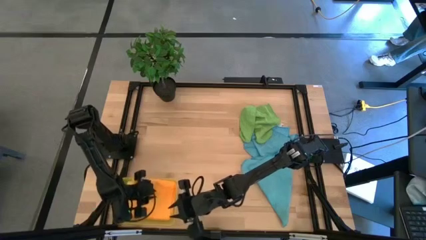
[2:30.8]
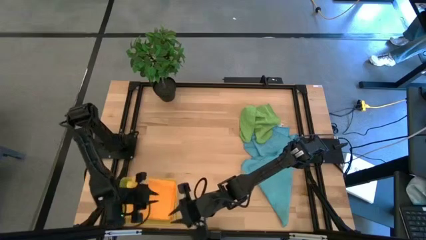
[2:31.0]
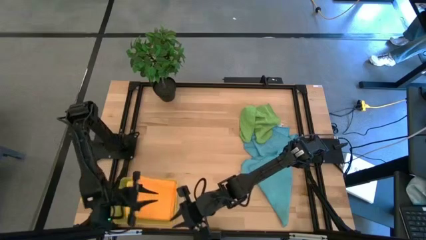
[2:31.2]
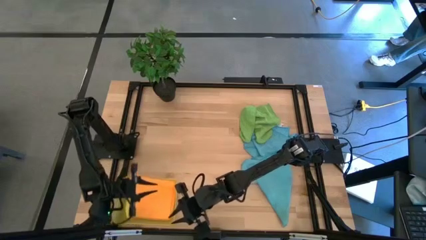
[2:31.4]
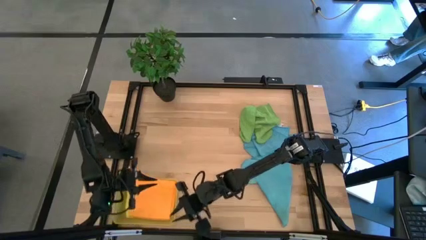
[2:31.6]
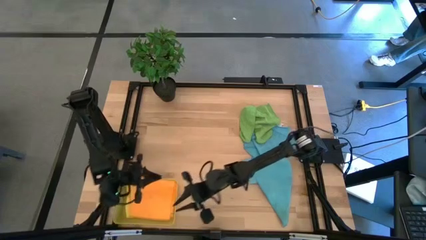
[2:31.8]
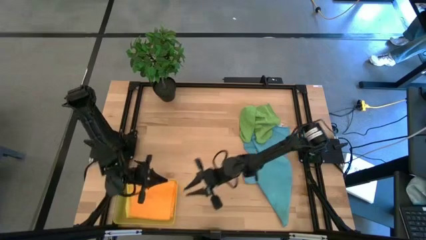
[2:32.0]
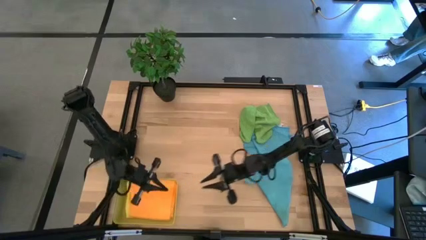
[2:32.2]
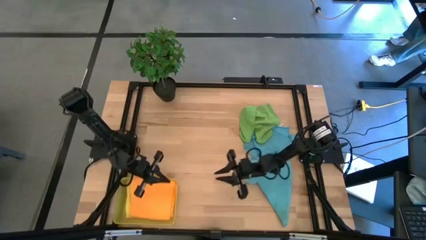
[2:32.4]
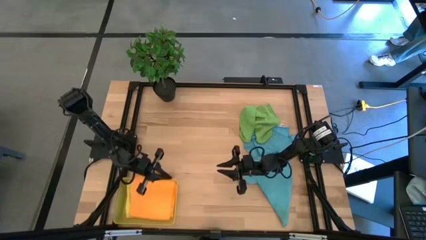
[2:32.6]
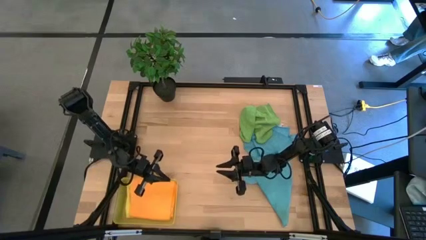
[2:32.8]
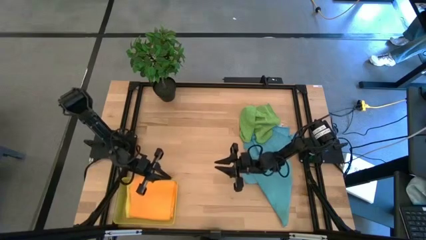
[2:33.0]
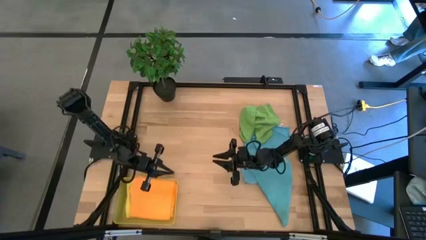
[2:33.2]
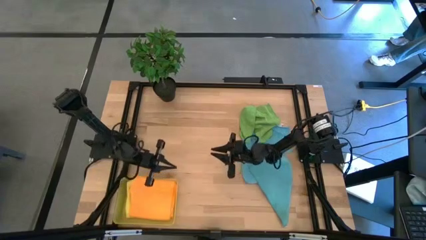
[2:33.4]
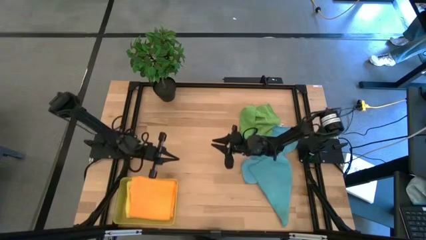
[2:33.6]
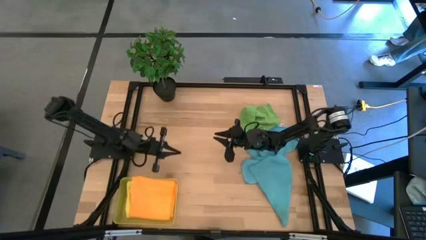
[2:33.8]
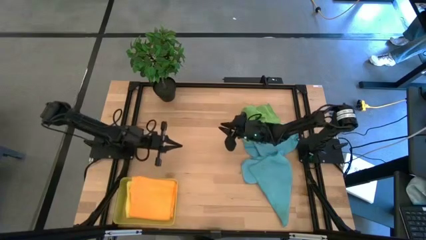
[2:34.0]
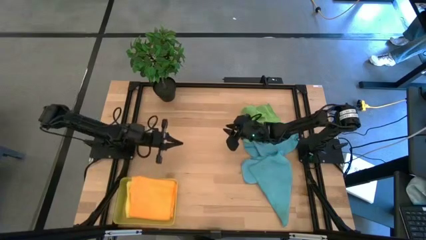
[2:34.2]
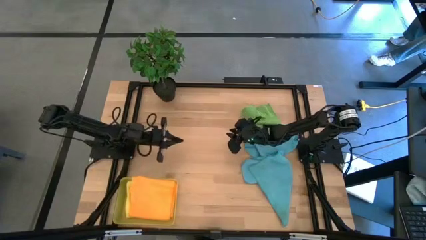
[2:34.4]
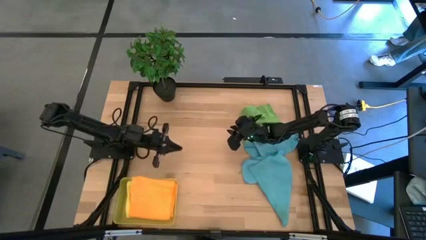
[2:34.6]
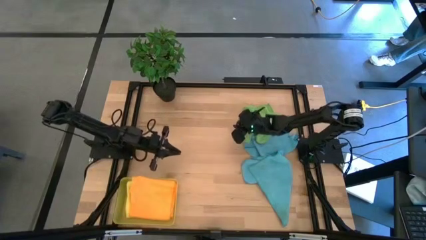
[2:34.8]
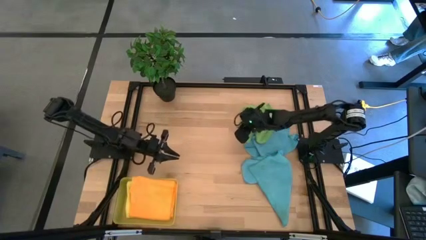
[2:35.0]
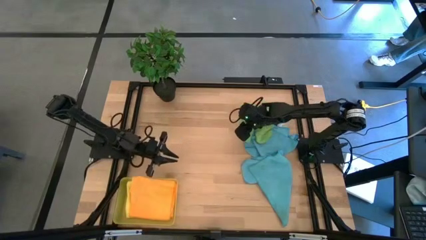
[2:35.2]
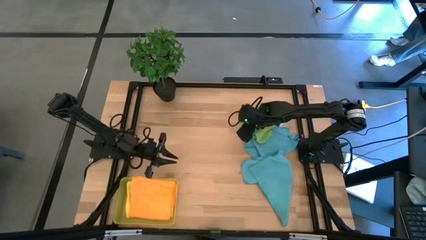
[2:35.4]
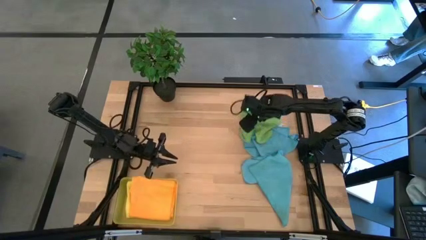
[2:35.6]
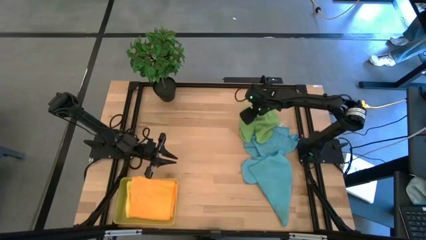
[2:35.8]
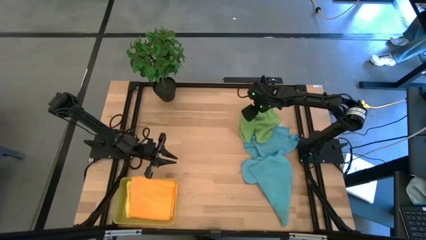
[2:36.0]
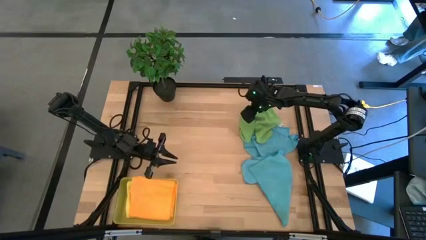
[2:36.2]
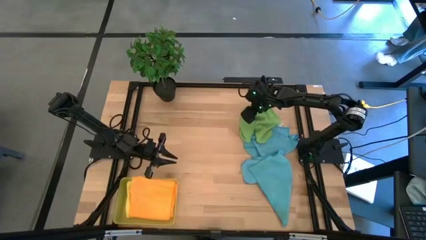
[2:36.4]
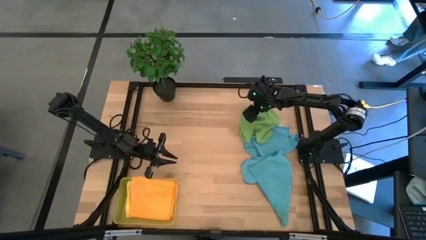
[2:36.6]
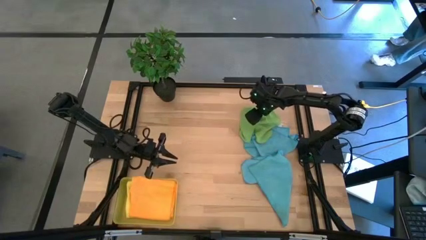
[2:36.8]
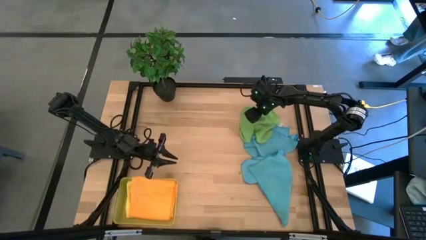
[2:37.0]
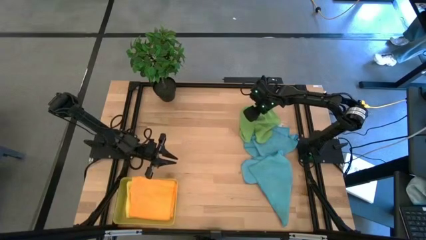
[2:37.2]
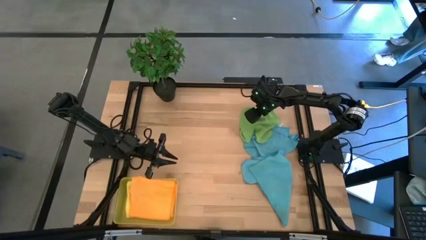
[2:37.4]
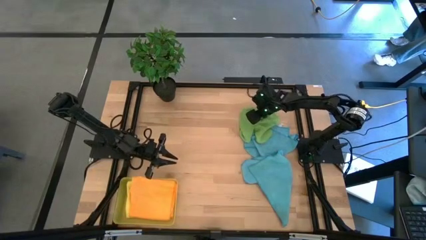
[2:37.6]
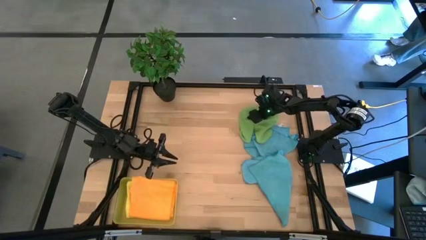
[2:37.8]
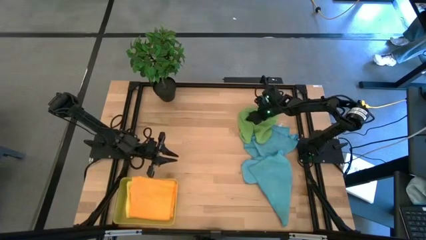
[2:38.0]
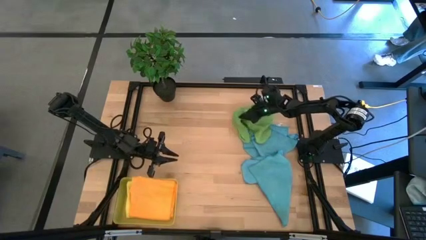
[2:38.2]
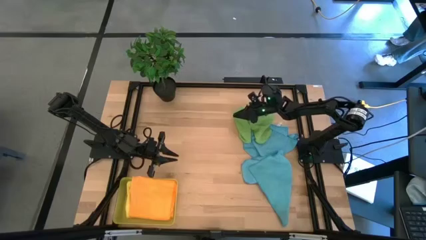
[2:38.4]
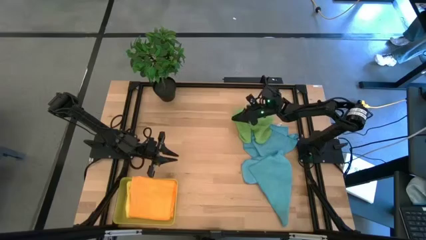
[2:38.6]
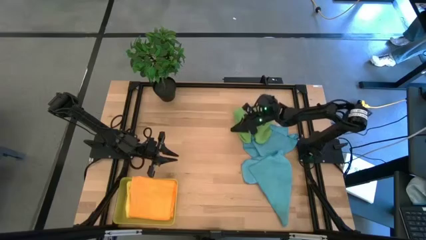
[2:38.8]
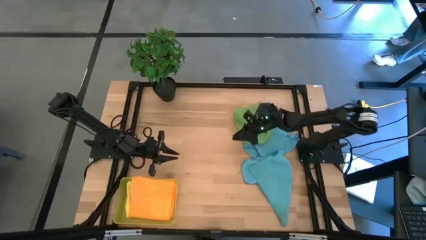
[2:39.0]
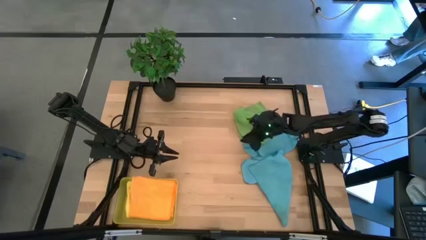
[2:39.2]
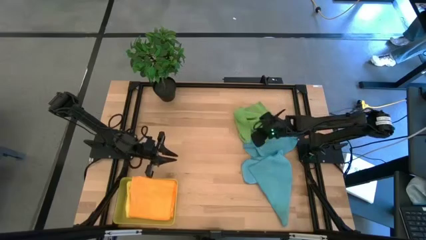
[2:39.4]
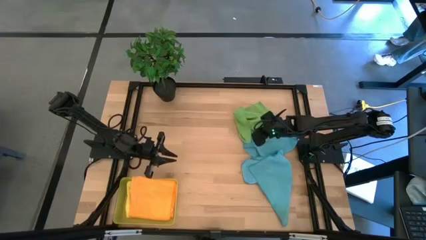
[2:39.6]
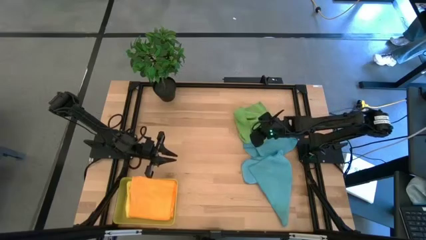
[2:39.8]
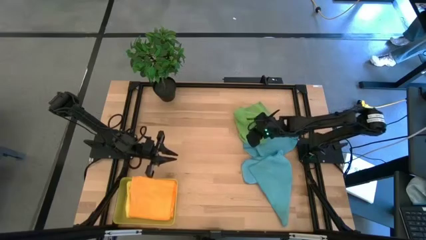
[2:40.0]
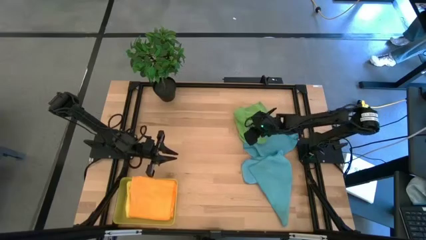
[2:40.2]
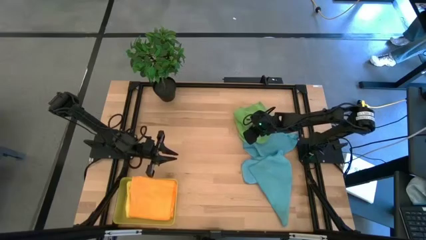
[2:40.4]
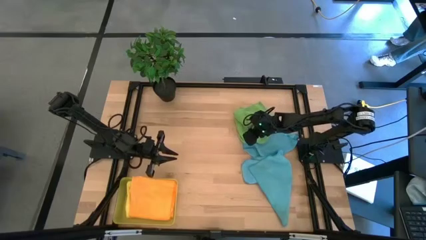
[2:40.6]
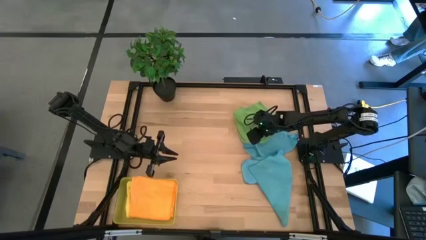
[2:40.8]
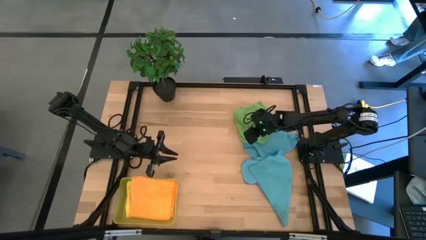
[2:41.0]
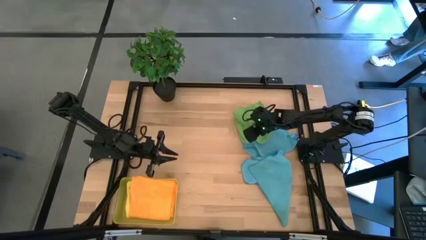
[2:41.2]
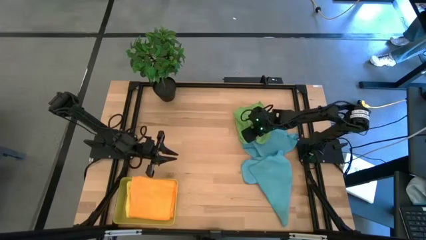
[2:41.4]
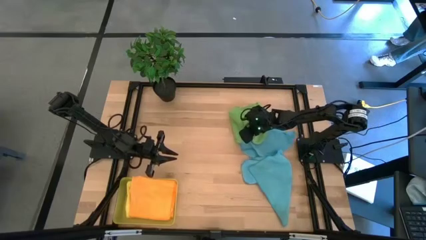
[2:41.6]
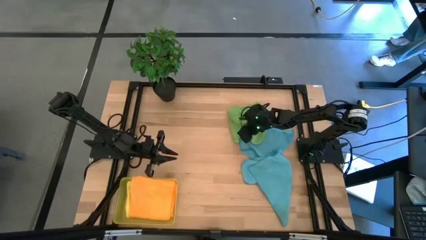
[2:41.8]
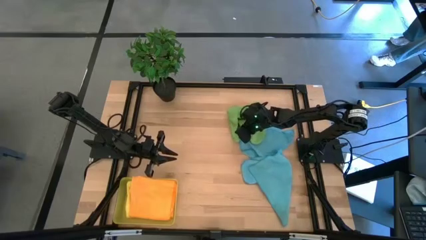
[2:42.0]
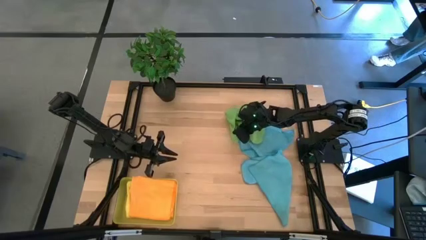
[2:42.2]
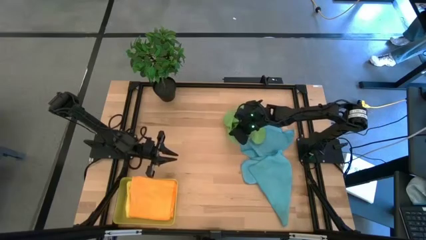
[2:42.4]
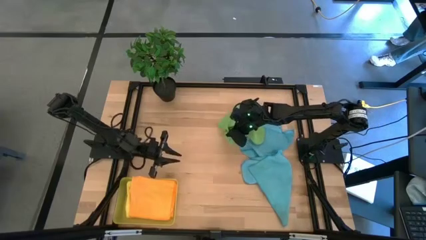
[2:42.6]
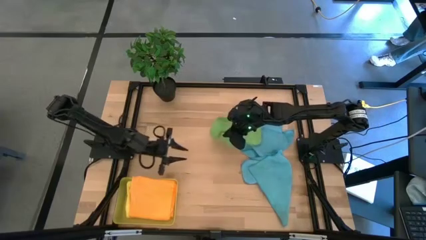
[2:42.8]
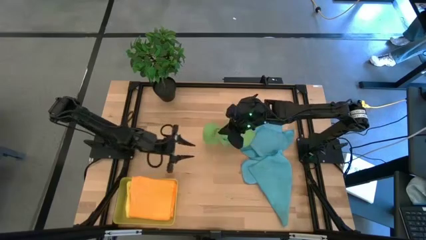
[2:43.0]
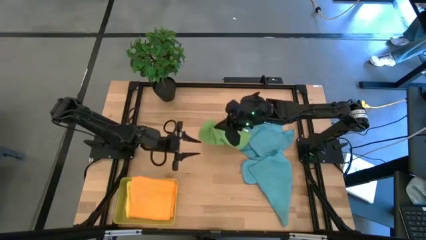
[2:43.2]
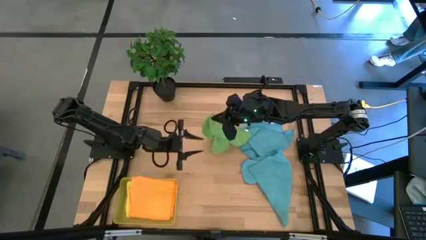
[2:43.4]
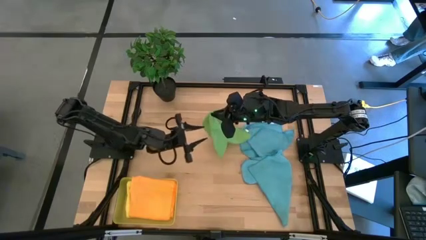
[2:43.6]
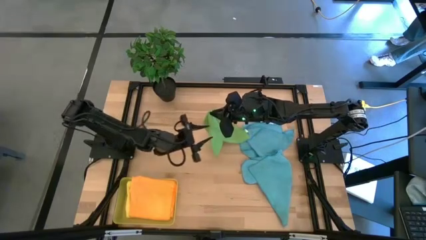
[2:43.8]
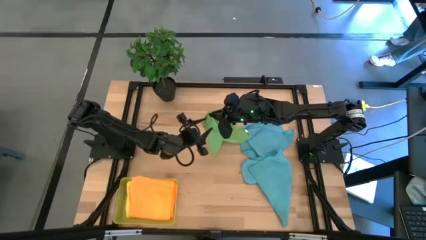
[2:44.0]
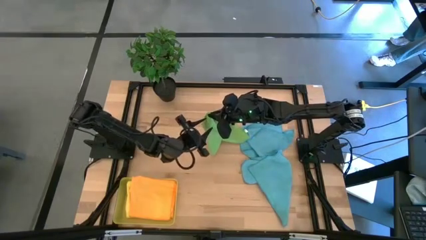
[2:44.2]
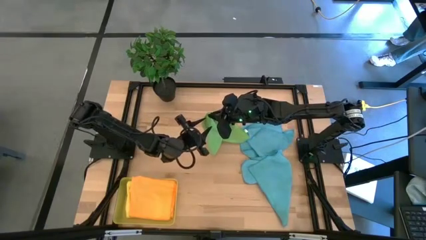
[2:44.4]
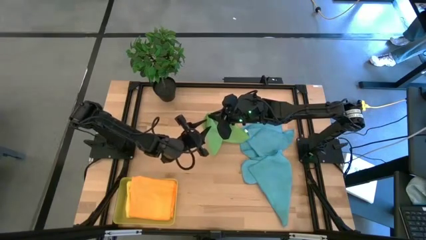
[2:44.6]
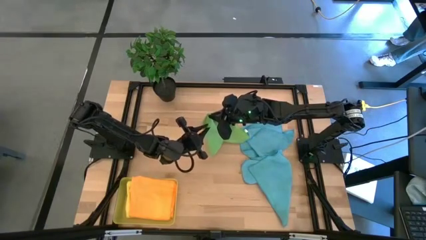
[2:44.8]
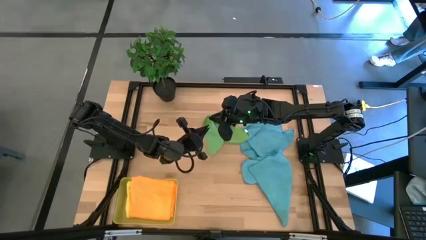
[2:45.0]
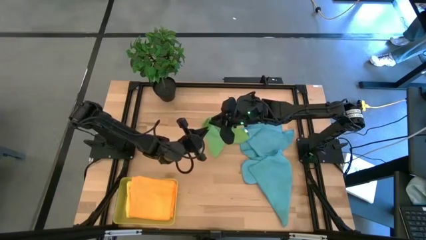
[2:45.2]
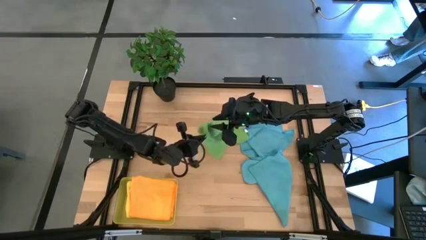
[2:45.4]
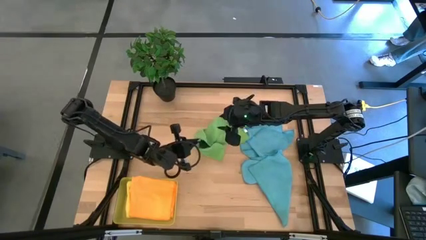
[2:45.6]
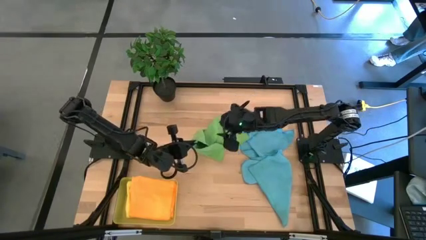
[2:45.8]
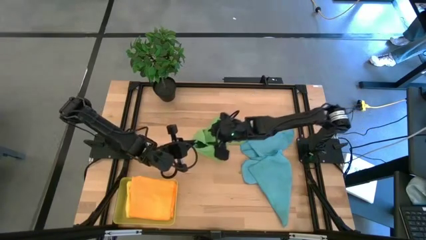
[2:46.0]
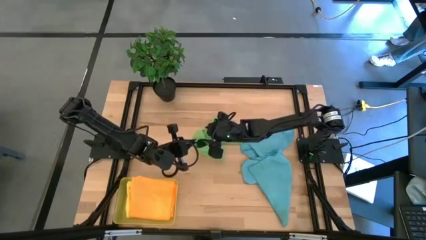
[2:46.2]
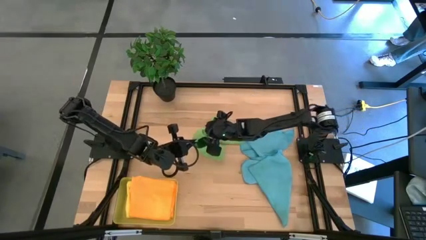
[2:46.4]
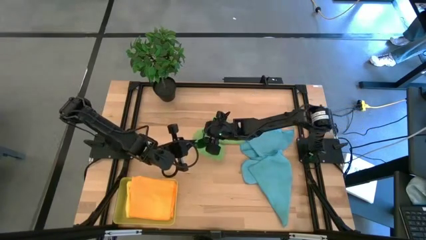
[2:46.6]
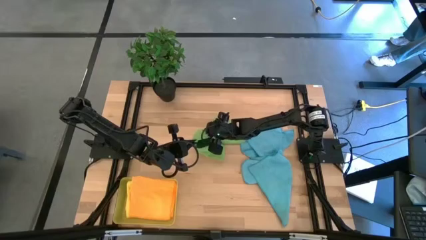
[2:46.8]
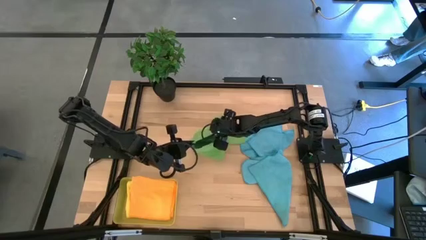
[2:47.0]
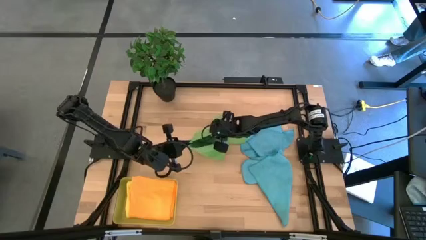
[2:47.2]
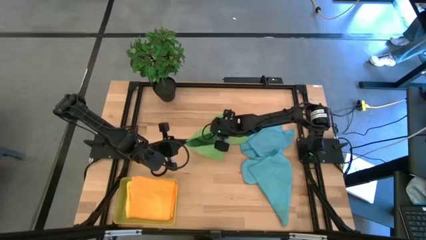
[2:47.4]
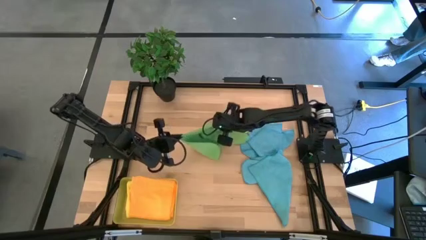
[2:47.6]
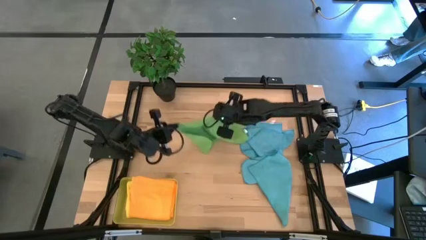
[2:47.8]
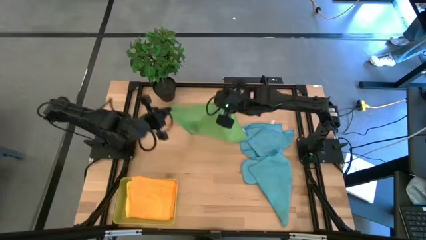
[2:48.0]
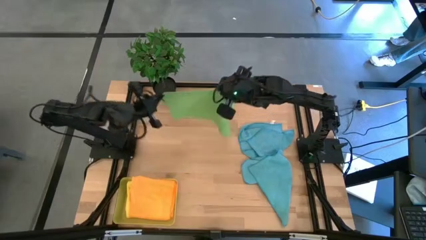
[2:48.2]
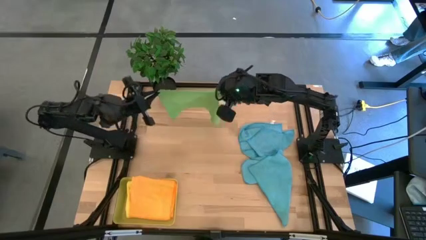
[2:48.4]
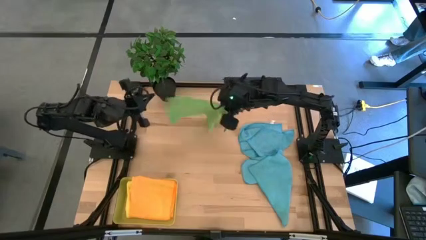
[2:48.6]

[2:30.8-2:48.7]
Task: Fold microfiber towels
Fold the green microfiber cloth
